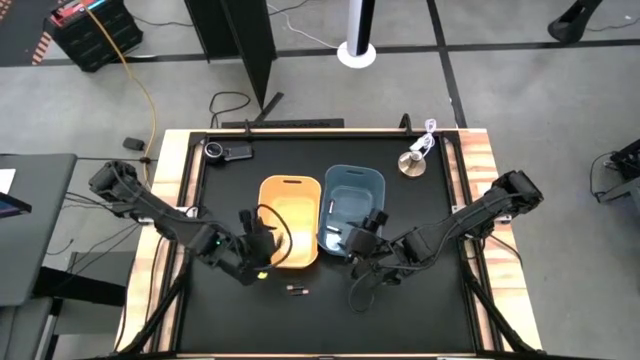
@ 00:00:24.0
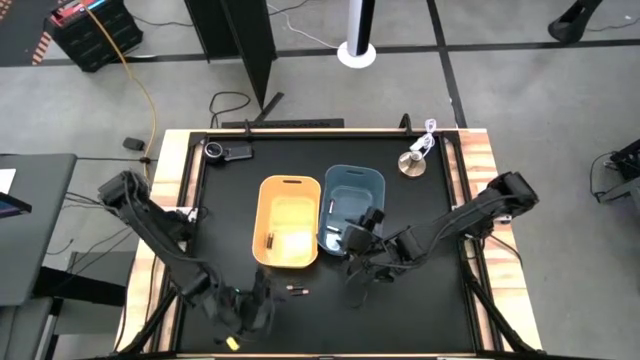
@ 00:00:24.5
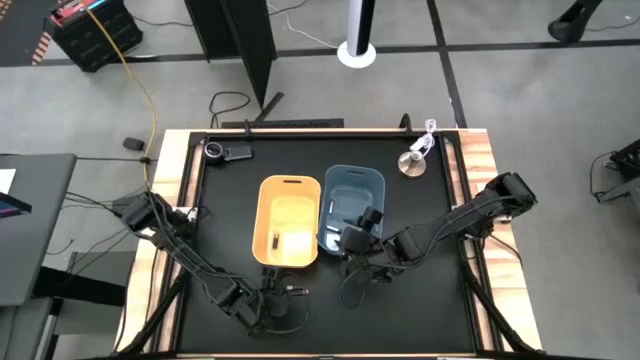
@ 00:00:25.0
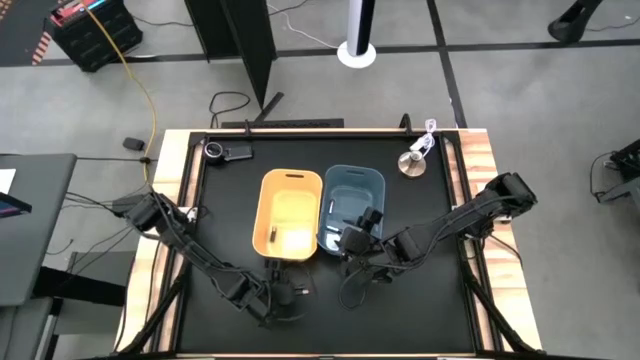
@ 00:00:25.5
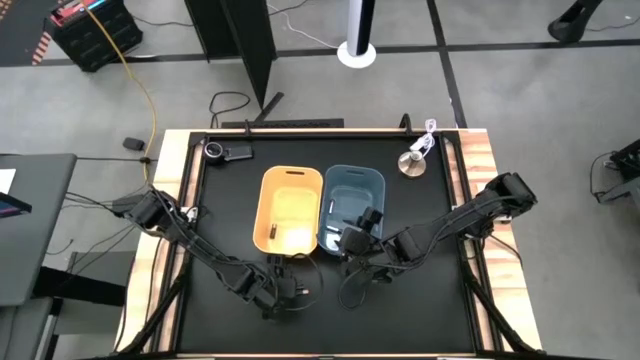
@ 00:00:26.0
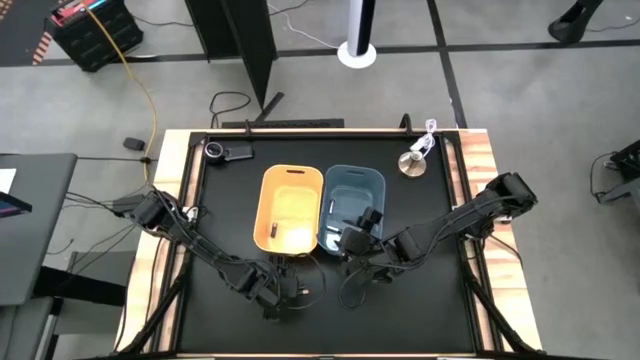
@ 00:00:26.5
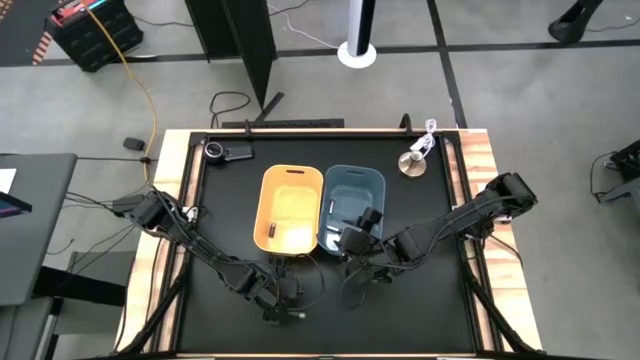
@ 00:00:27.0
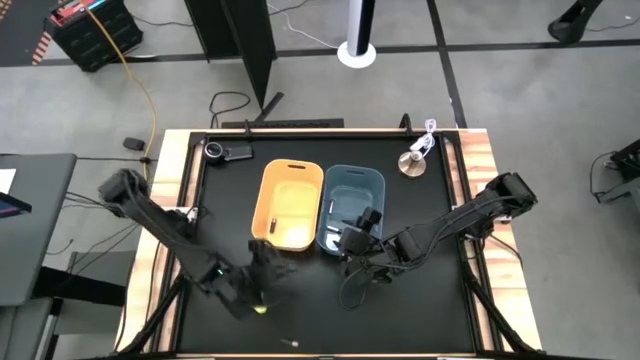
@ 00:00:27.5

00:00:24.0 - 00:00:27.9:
Task: Sort batteries
Put the top black battery into the yellow bin

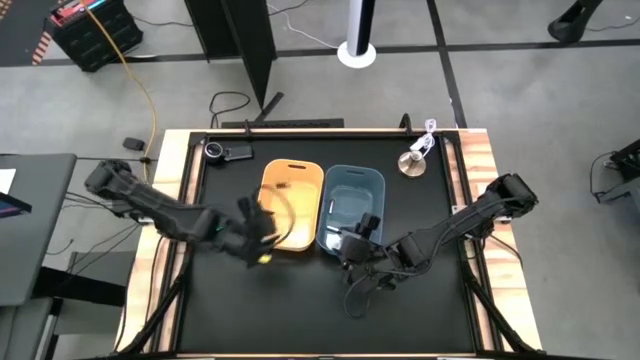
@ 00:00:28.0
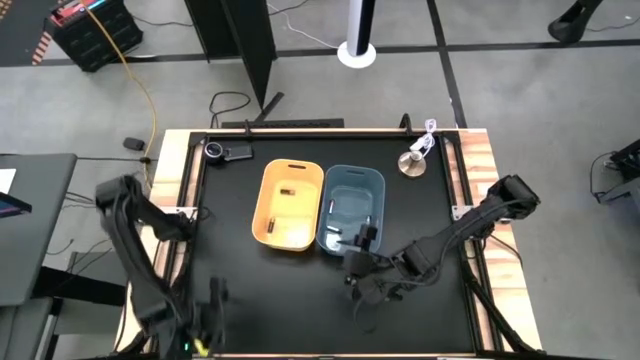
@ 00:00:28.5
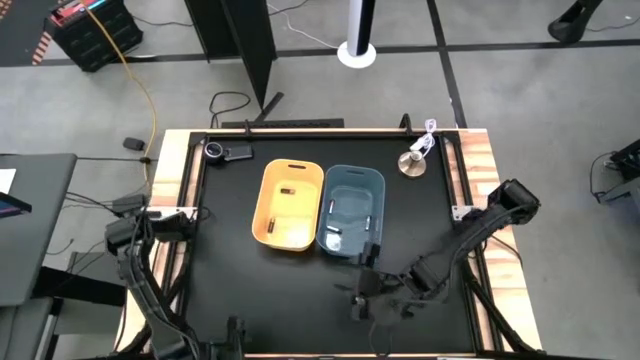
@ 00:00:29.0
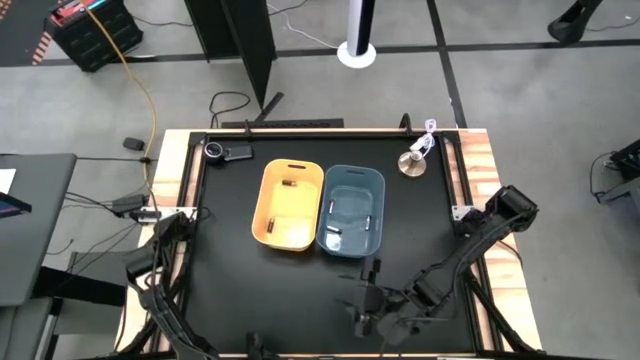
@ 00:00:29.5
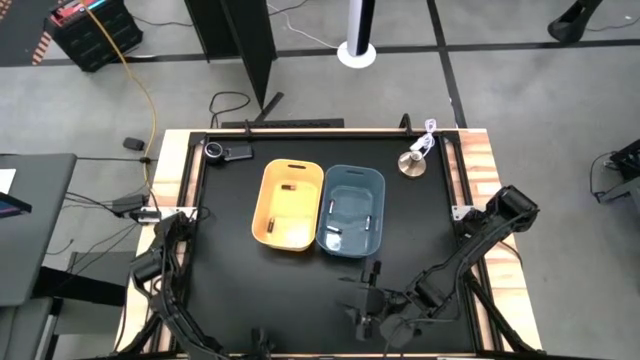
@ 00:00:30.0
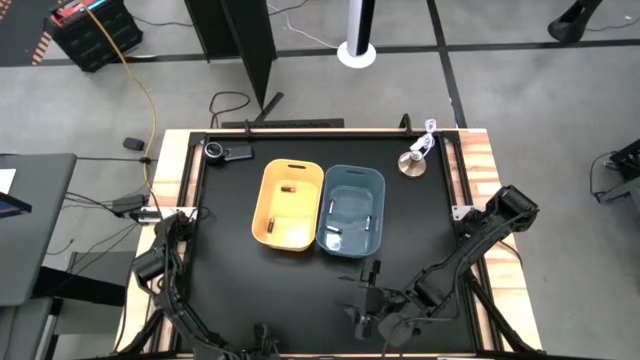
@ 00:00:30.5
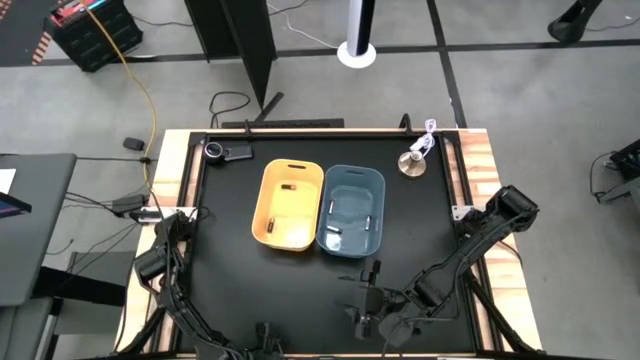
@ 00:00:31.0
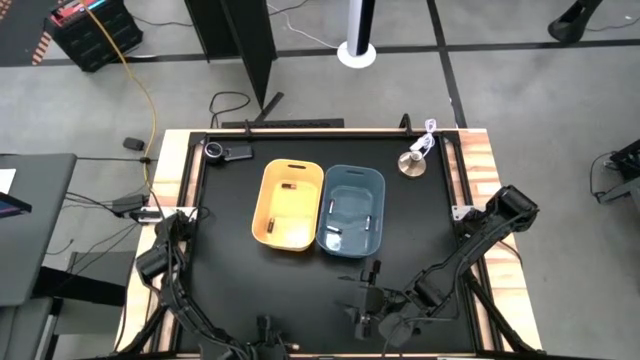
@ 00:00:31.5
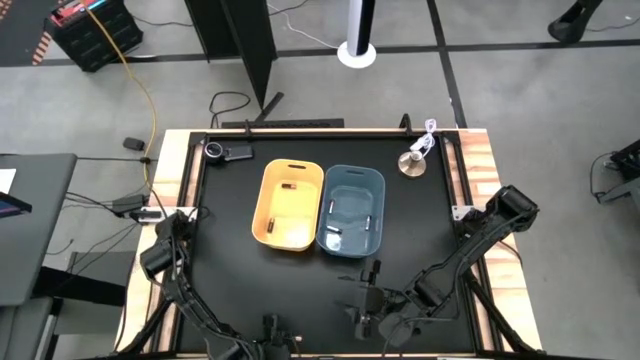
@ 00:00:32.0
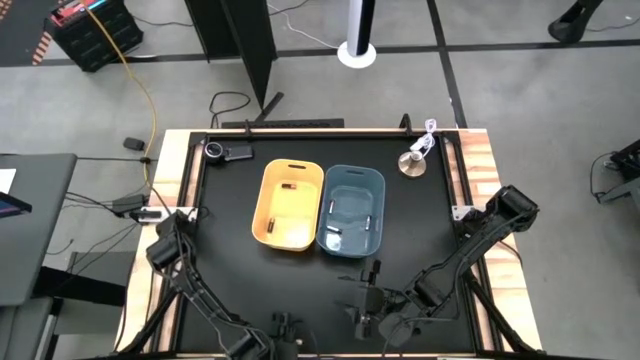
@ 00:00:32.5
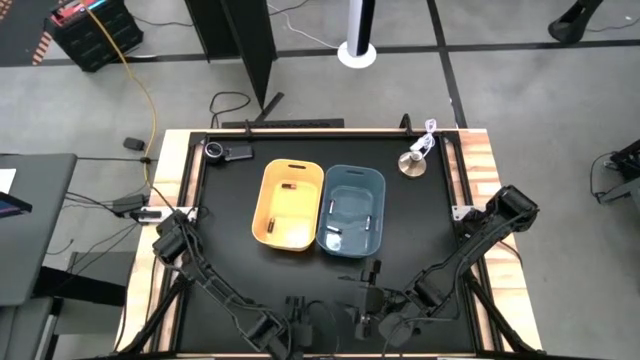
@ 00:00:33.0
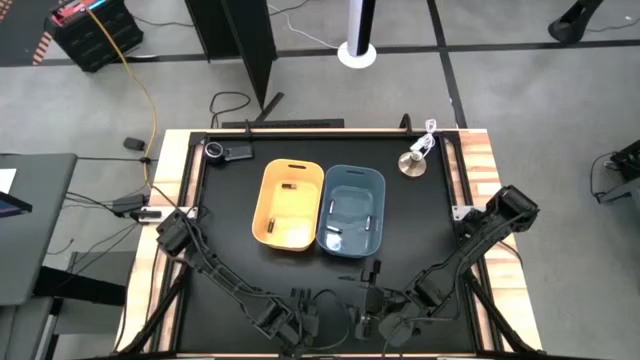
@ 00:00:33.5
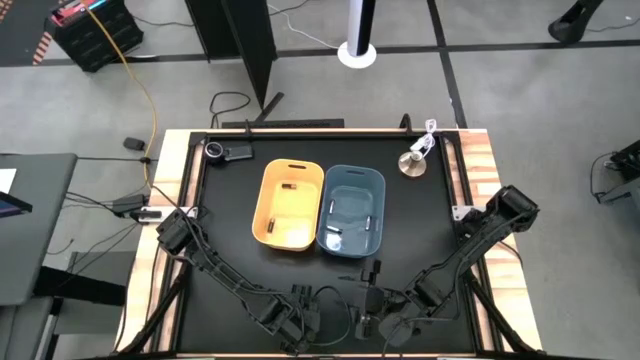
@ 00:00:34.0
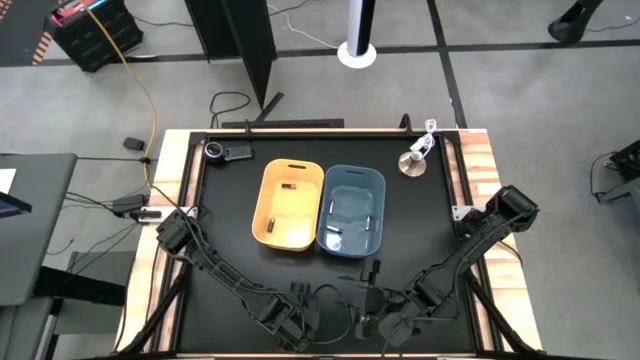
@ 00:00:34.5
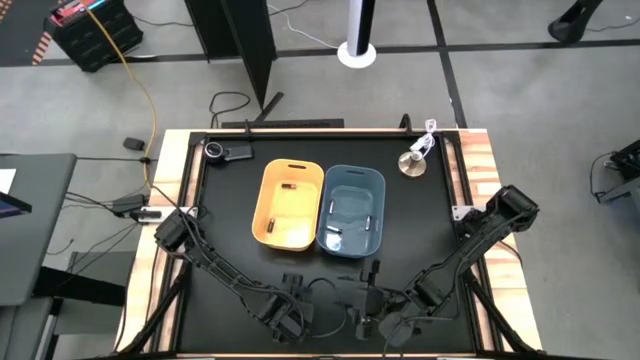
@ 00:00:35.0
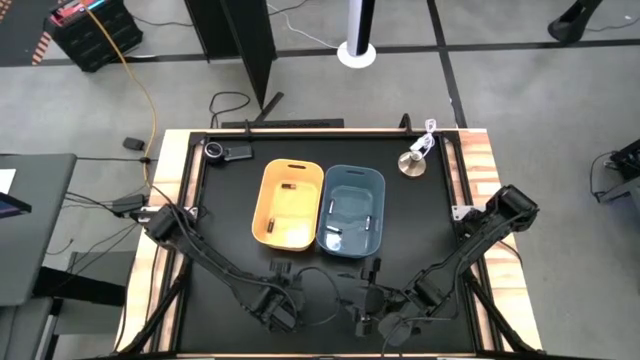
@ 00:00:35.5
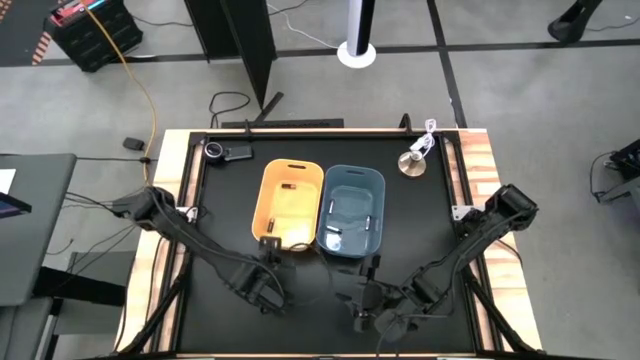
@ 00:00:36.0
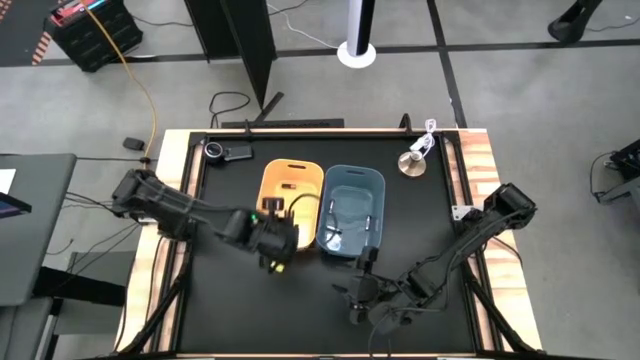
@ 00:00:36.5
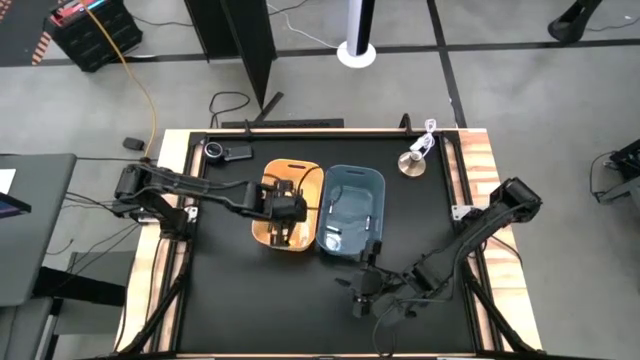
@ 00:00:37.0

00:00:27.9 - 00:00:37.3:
Put the black battery into the yellow bin

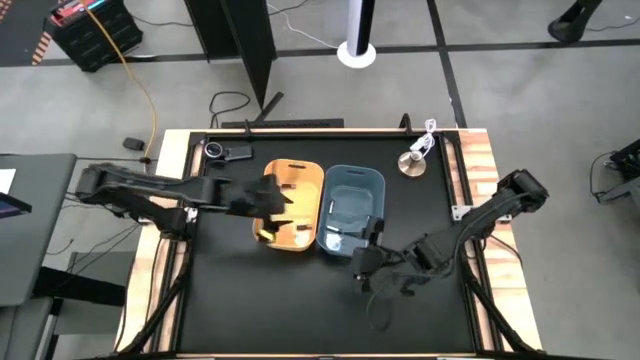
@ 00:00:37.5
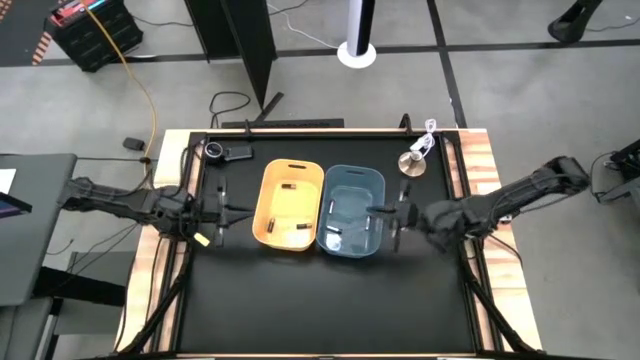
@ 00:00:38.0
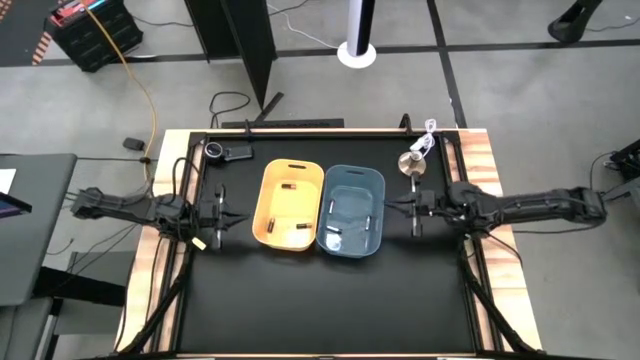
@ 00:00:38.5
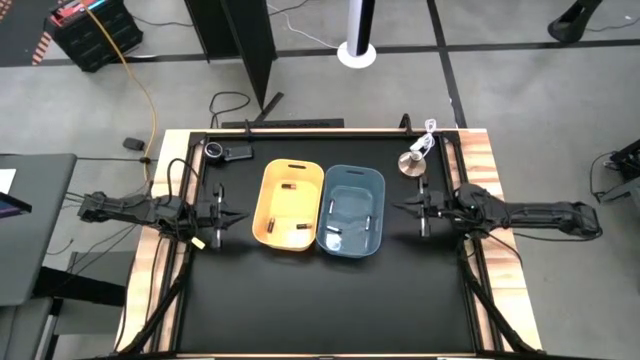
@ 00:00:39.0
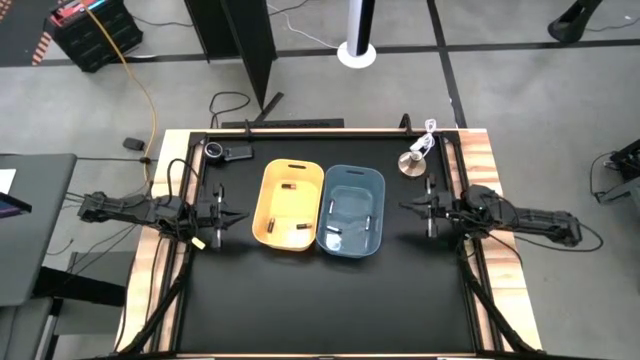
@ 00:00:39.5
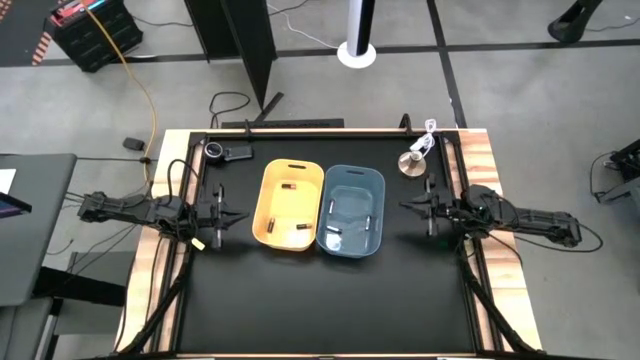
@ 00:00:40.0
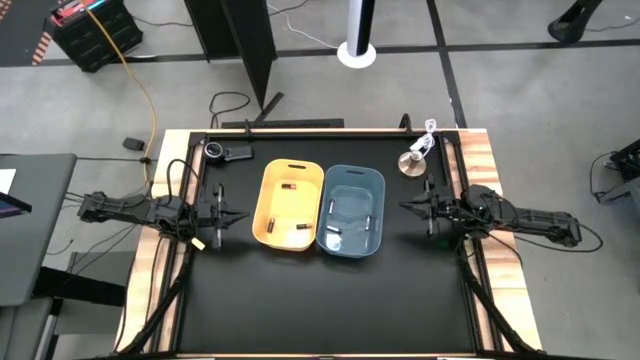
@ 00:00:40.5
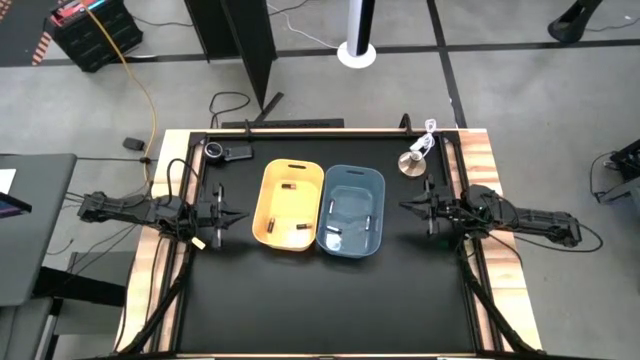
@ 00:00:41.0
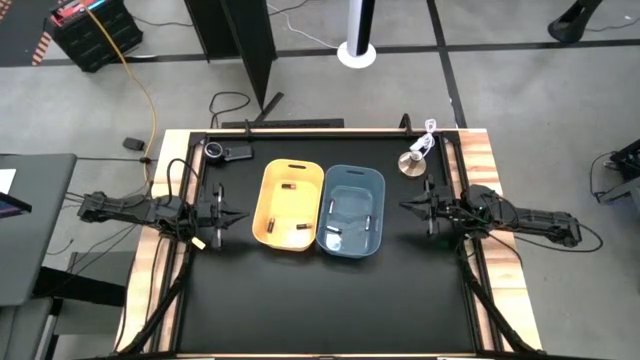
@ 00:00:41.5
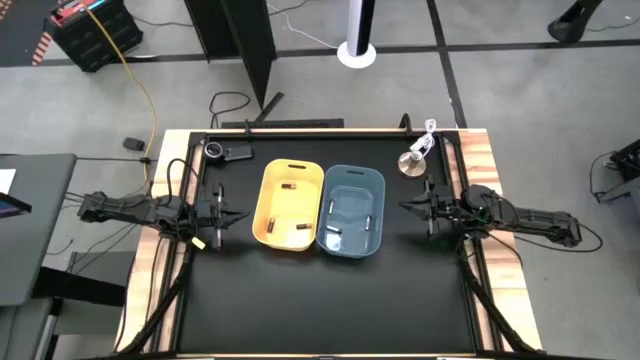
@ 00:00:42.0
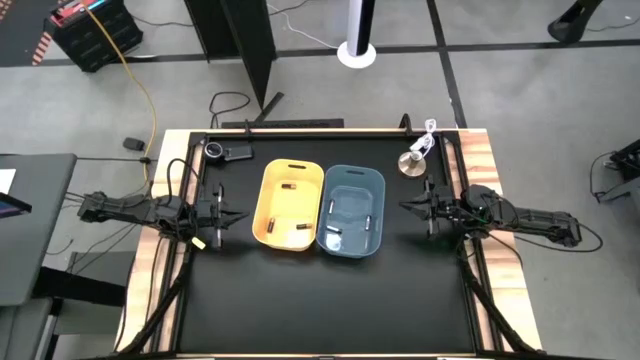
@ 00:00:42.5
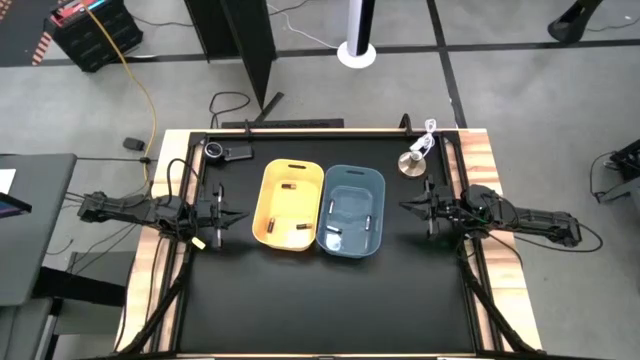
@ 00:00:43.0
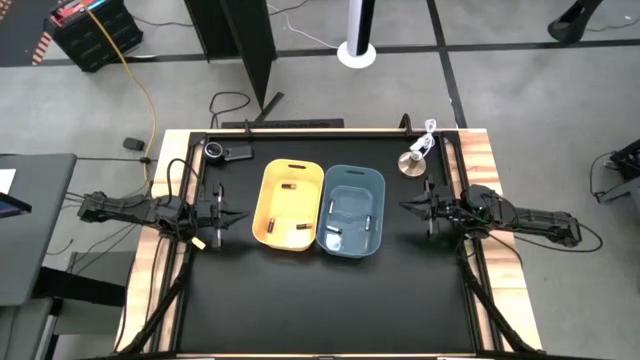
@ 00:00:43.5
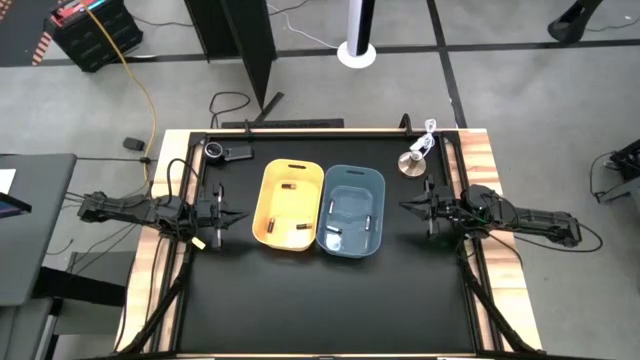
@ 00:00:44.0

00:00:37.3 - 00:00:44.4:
Return to Home Position
